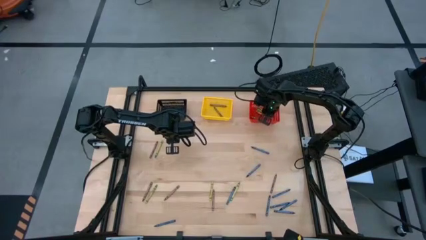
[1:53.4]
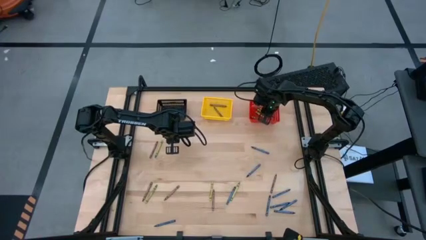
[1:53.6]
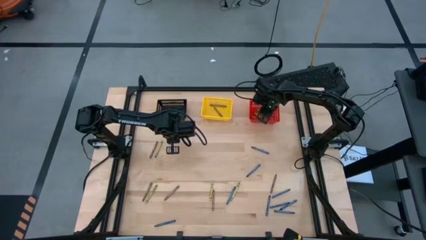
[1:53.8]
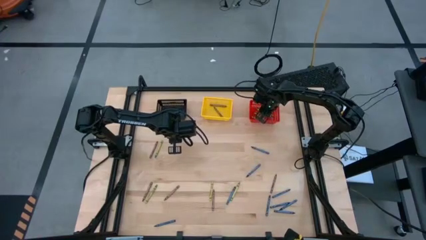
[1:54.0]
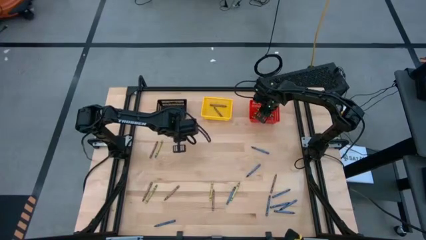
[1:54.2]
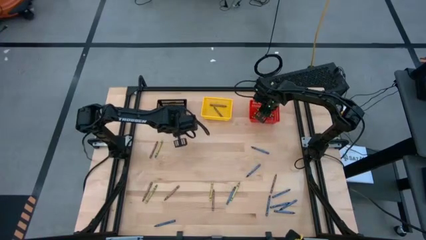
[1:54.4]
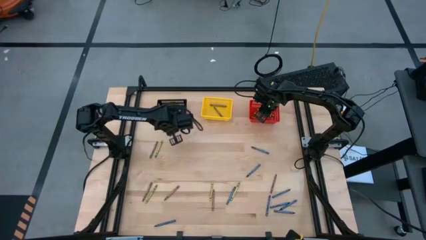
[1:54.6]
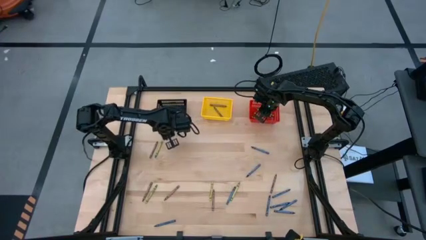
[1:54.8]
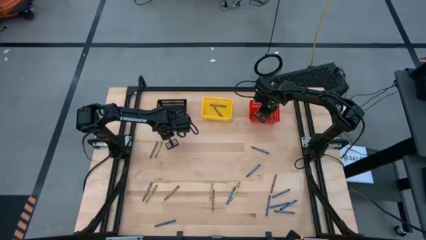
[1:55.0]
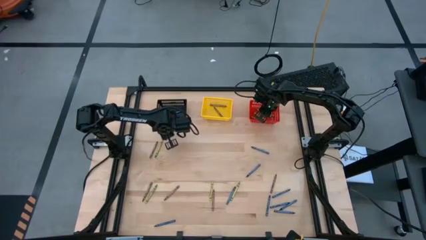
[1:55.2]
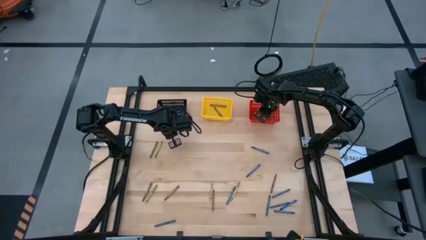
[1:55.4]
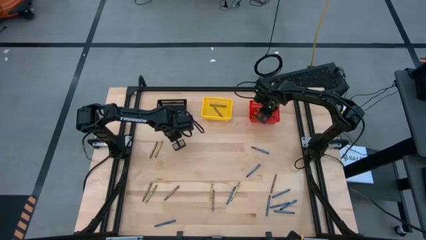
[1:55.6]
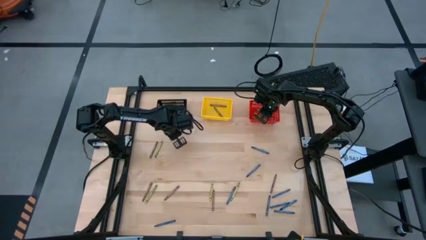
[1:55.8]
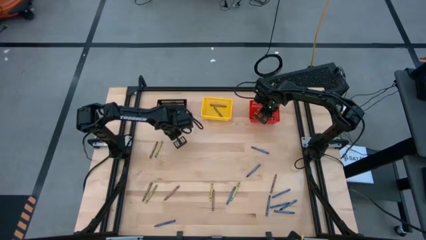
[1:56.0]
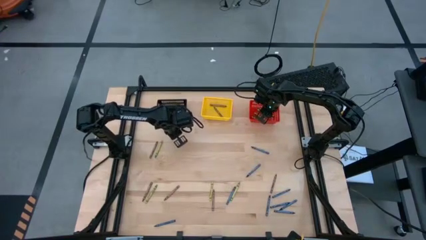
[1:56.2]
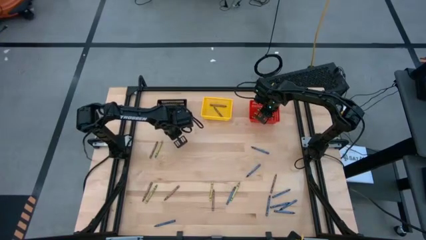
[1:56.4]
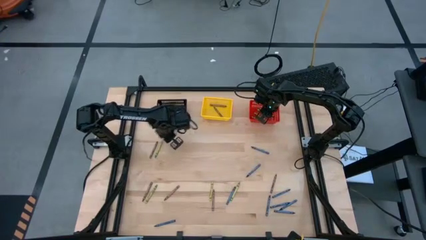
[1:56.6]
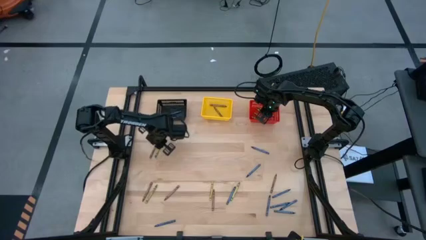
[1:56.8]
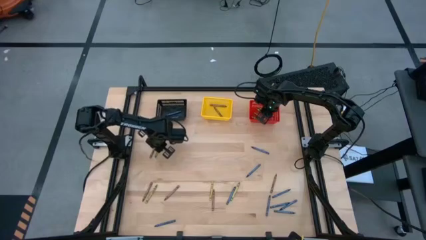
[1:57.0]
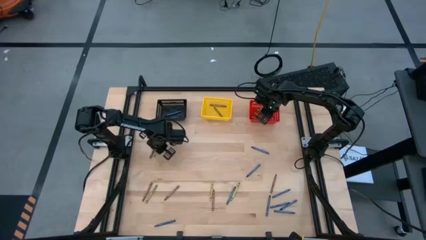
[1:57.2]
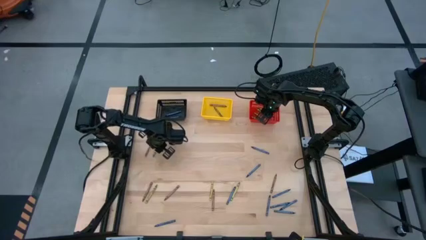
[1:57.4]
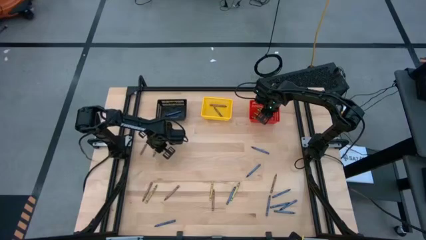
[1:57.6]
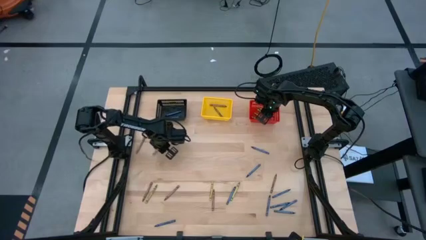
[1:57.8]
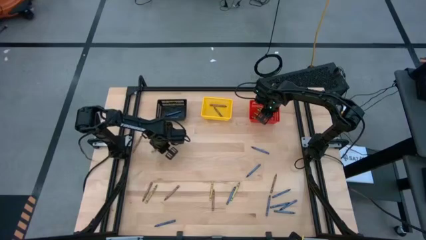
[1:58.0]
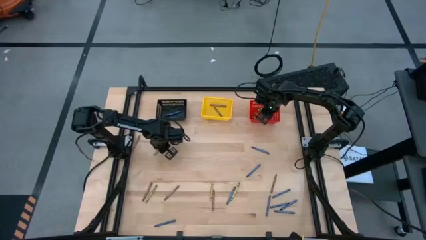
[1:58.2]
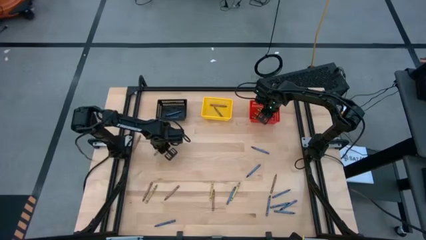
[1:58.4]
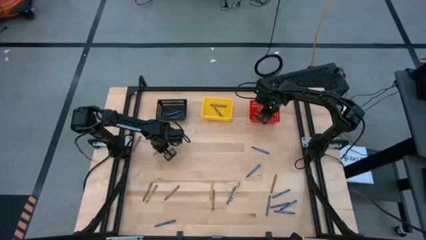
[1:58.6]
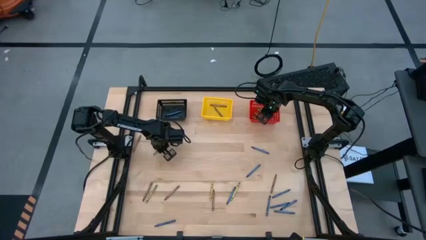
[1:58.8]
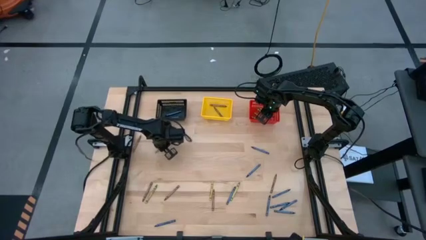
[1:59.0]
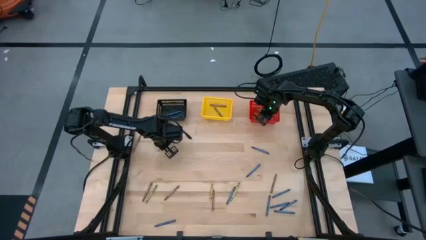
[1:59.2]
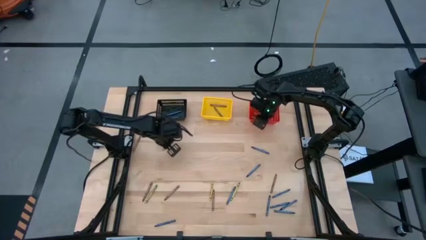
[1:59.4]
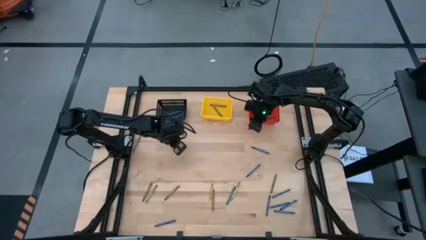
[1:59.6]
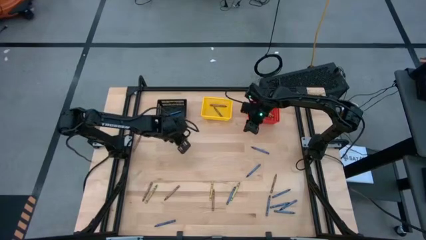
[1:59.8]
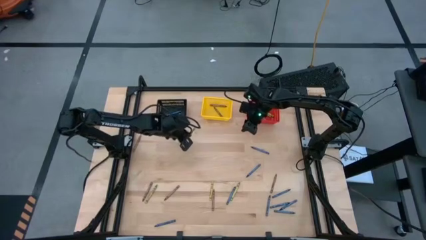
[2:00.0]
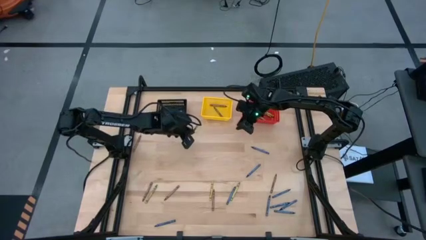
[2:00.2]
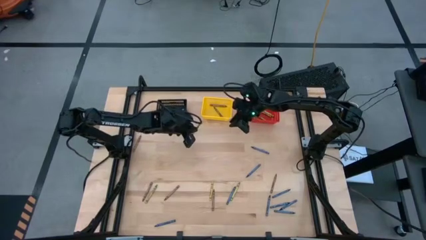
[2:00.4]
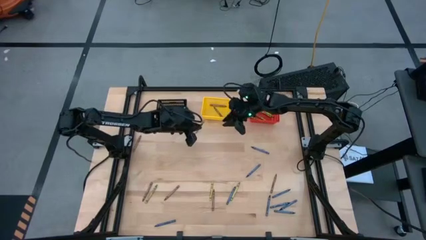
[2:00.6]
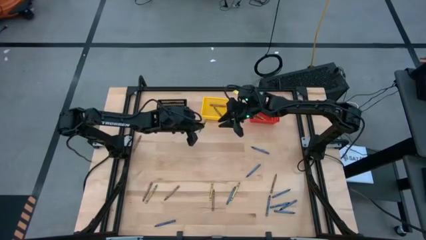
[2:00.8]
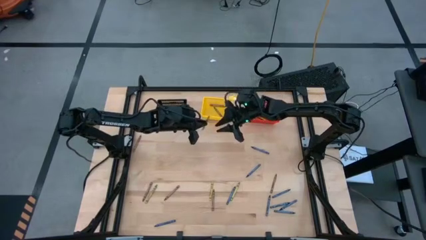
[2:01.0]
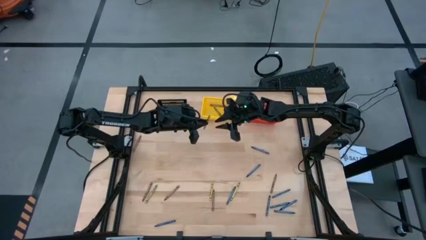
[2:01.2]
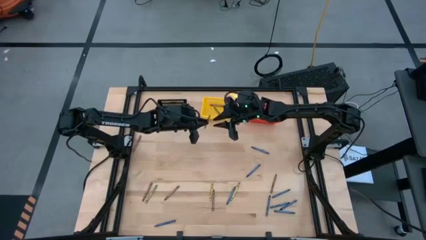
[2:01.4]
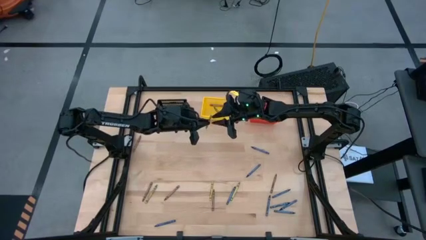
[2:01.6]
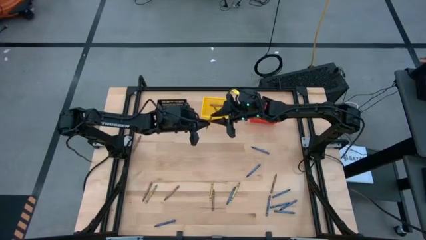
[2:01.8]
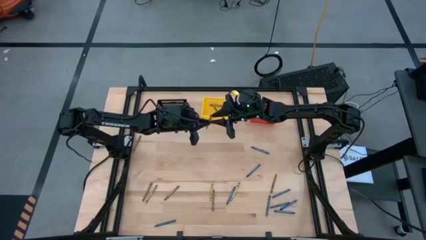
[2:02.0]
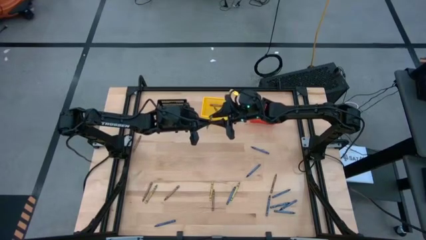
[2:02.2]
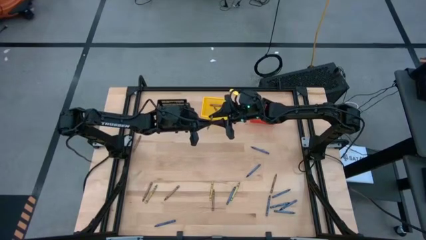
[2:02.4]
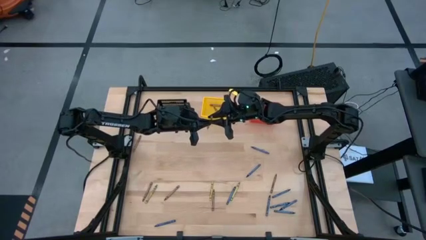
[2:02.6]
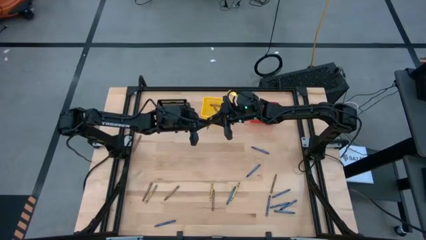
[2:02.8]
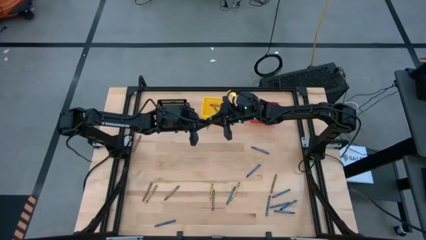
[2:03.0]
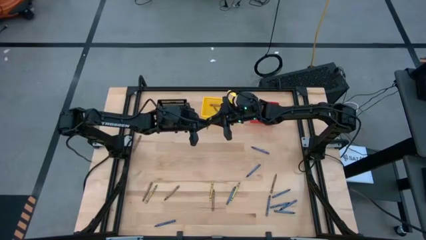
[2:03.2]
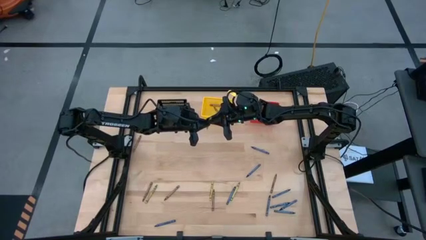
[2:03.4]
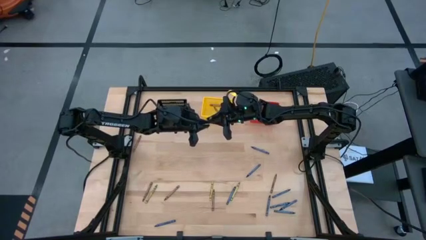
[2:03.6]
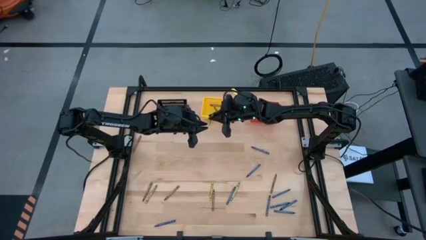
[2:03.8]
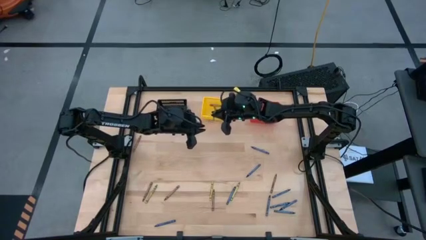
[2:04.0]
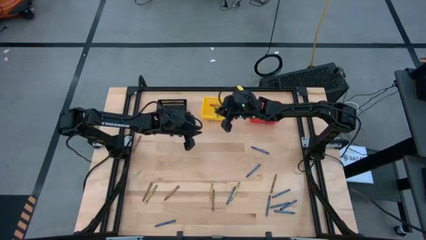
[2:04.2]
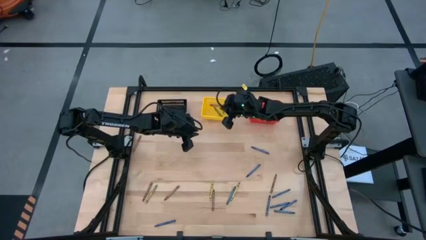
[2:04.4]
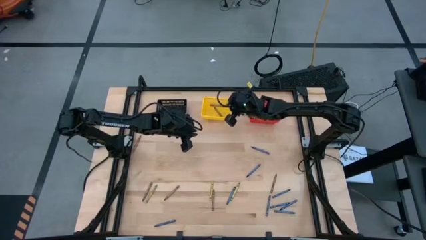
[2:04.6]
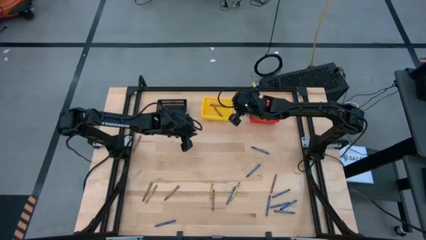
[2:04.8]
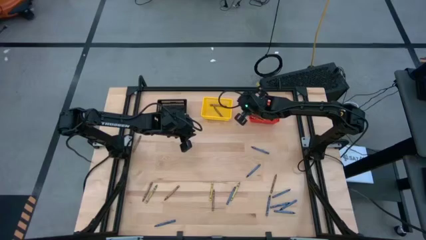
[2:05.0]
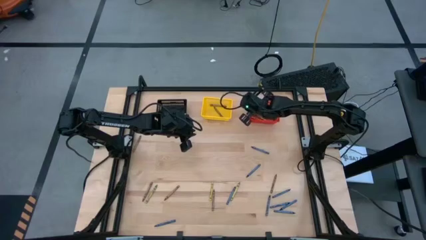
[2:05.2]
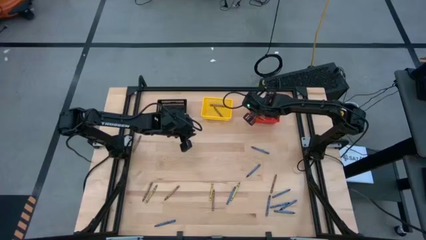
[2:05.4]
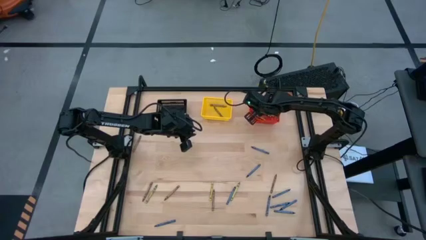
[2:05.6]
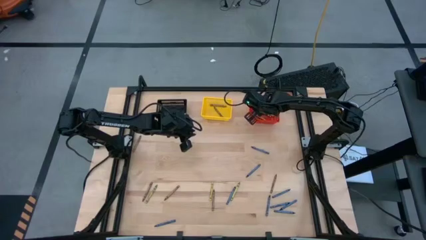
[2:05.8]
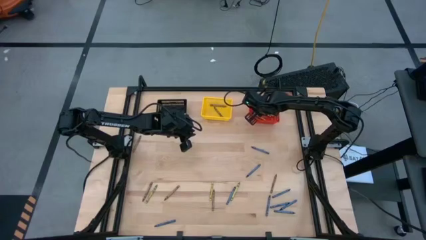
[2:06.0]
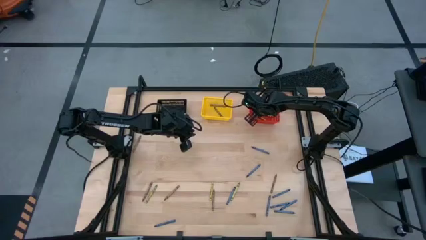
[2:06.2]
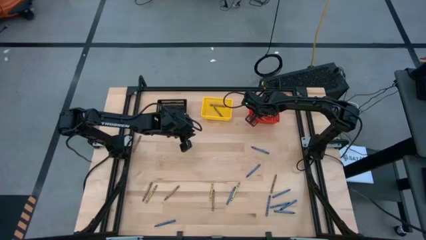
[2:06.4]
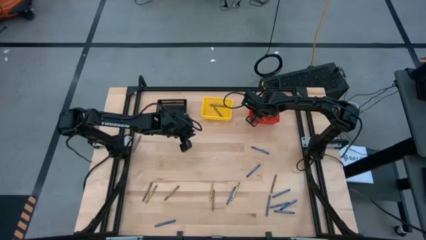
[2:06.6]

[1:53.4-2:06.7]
Task: Sort crayons
Put the green crayon into the red bin

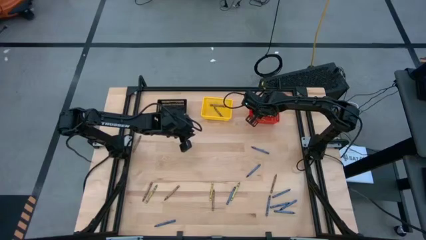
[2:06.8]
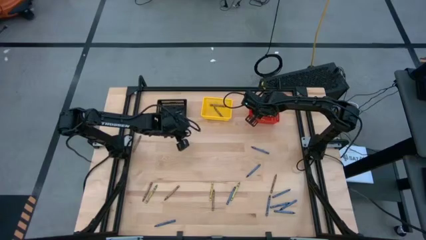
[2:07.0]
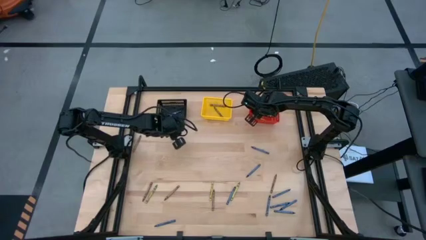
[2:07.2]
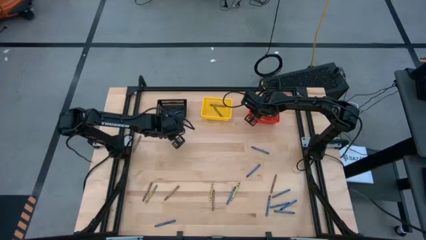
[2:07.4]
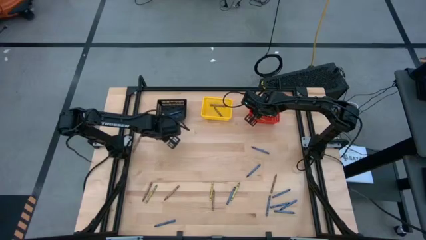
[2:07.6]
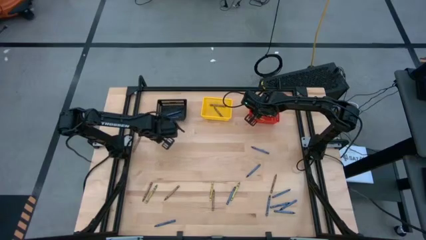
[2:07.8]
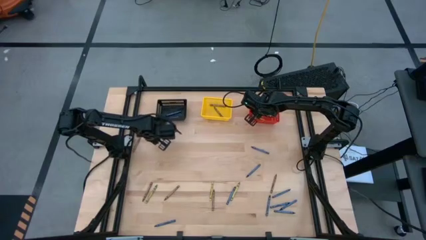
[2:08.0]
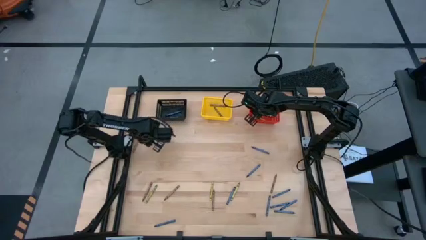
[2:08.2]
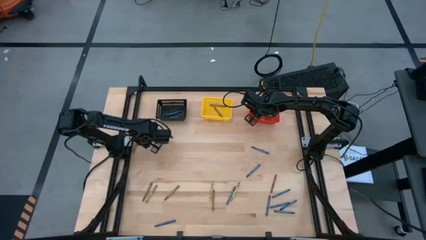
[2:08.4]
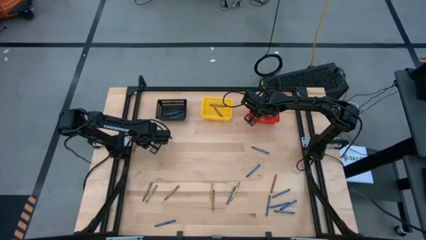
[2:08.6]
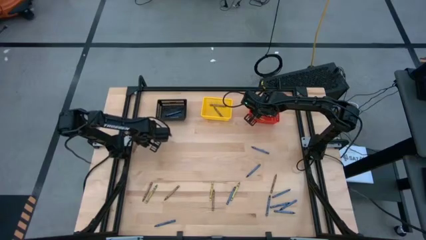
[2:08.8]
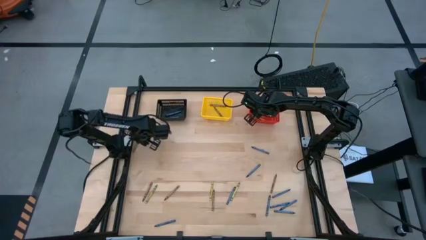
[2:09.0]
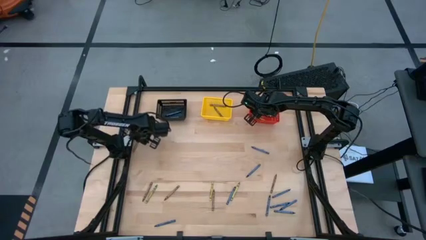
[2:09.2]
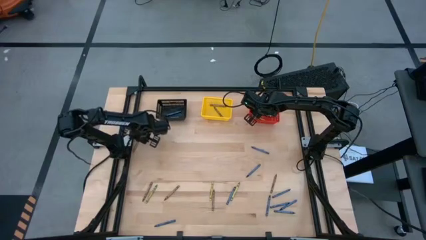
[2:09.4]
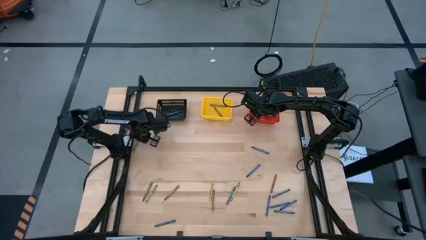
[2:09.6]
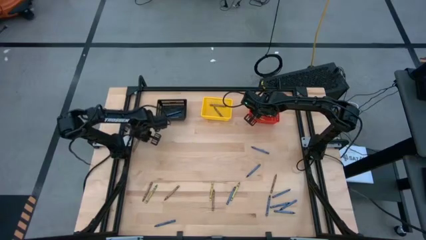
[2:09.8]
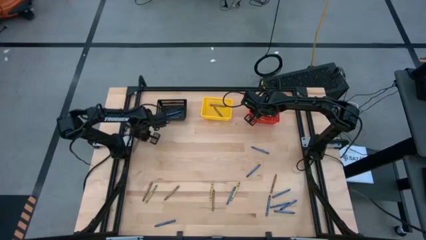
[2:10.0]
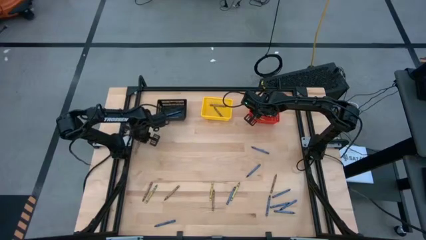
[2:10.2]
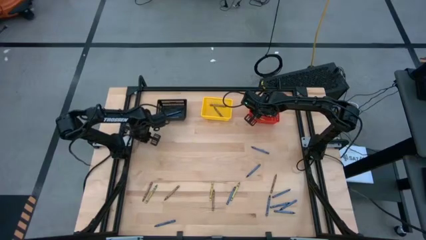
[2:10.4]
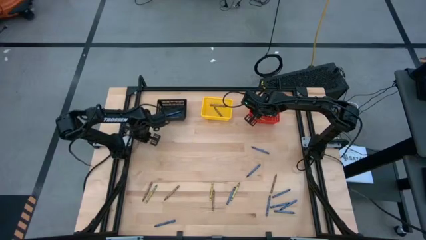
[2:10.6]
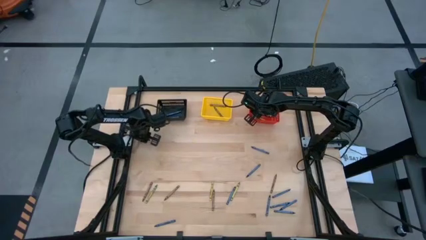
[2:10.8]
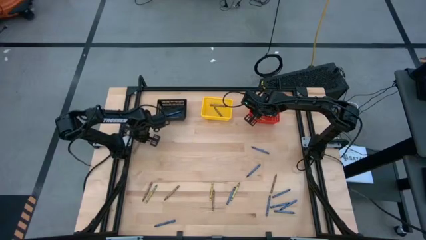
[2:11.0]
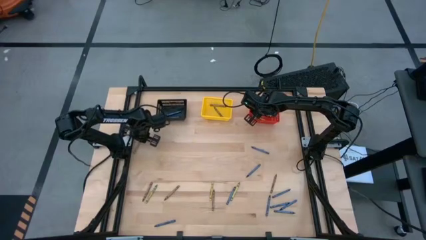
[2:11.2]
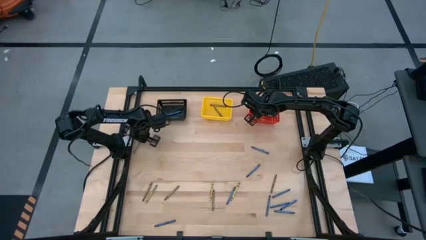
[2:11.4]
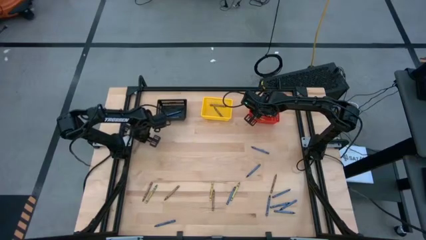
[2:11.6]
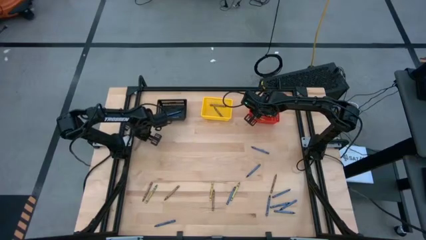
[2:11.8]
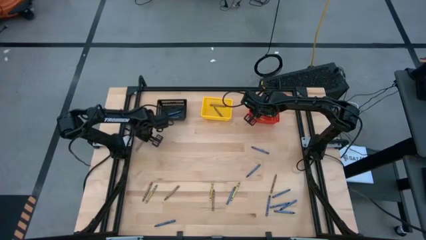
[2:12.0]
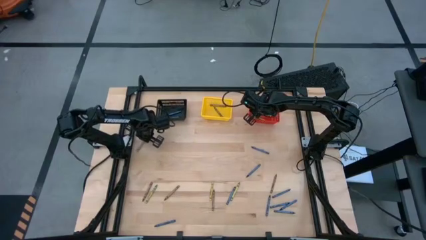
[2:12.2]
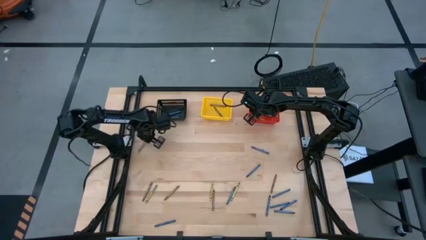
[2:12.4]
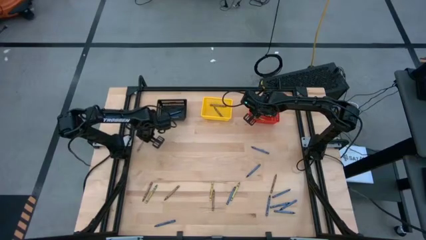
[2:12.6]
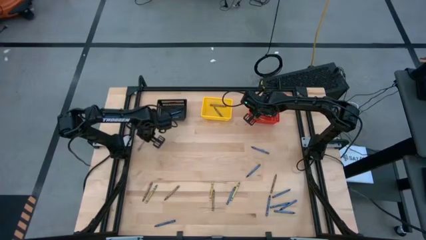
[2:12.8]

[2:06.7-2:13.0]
Put the brown crayon into the yellow bin
